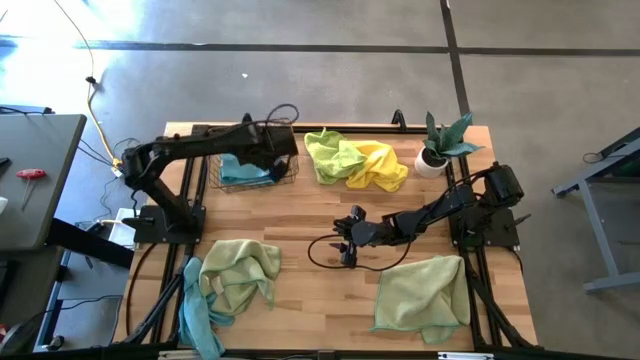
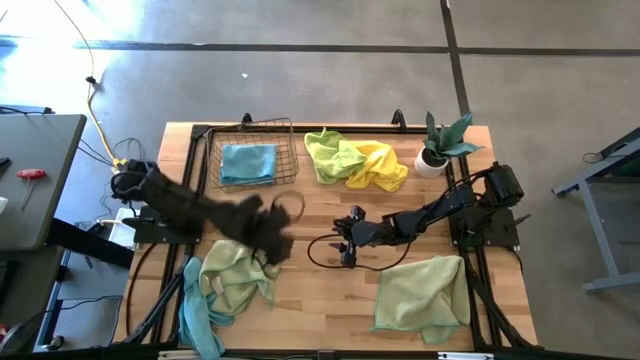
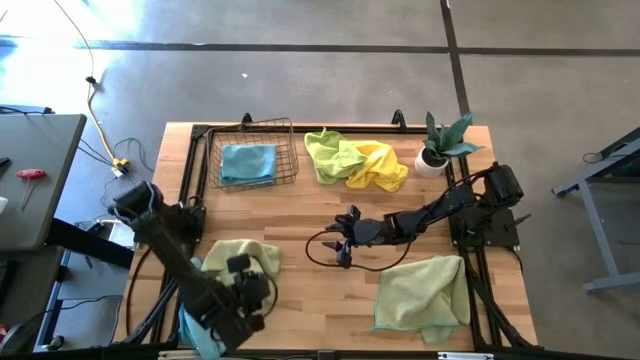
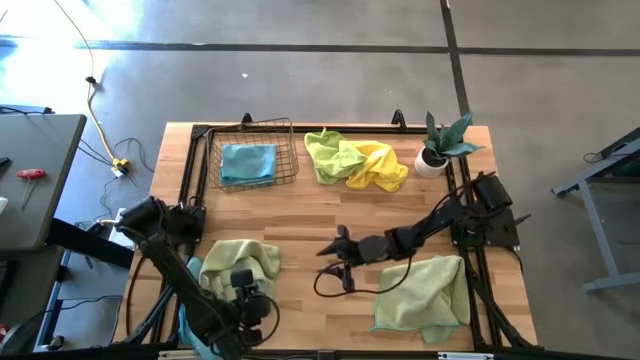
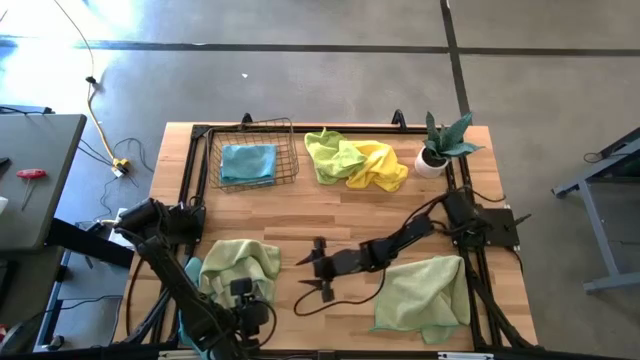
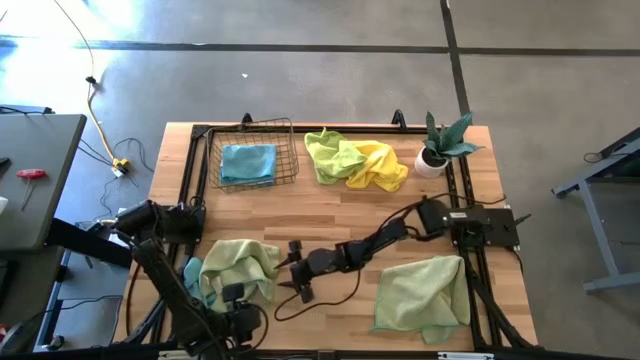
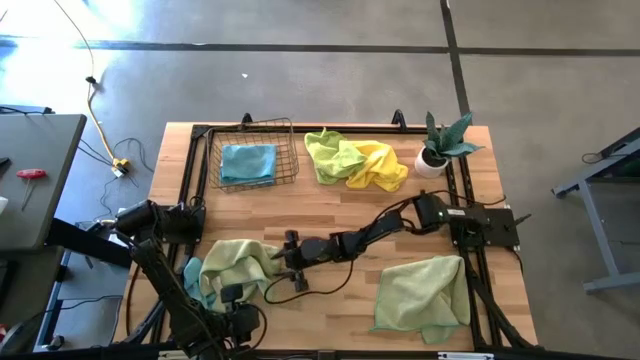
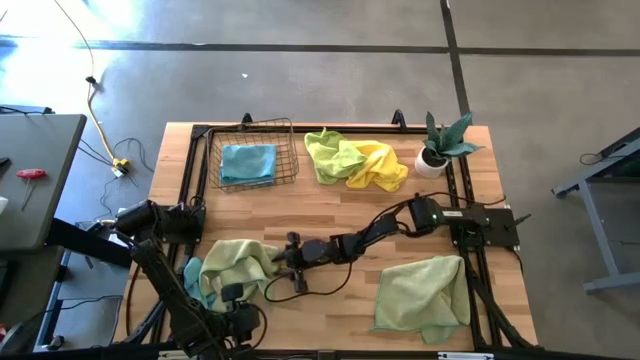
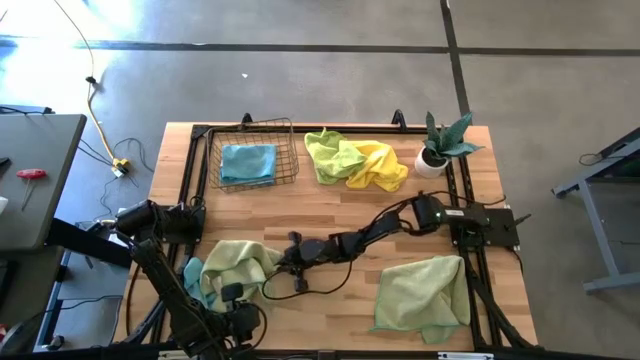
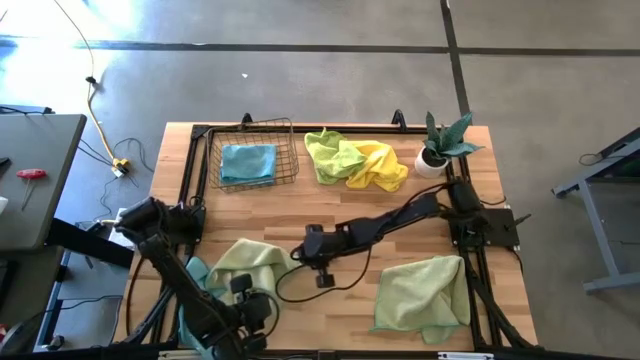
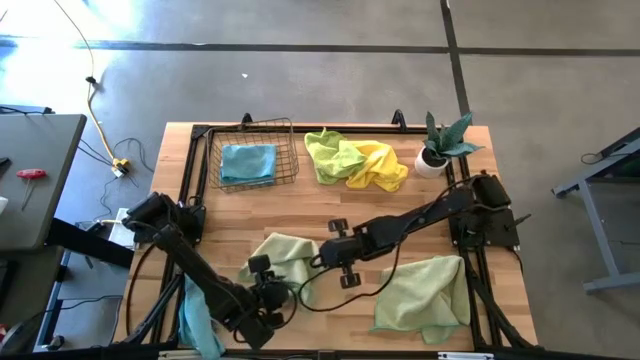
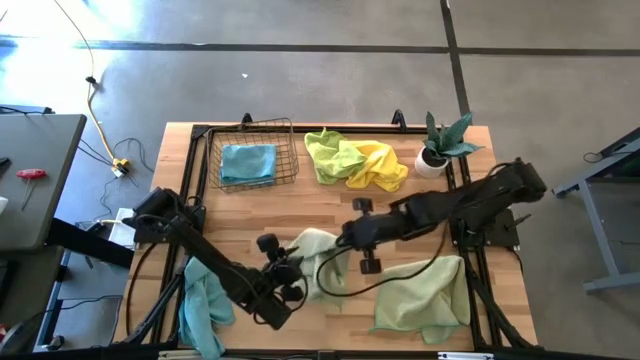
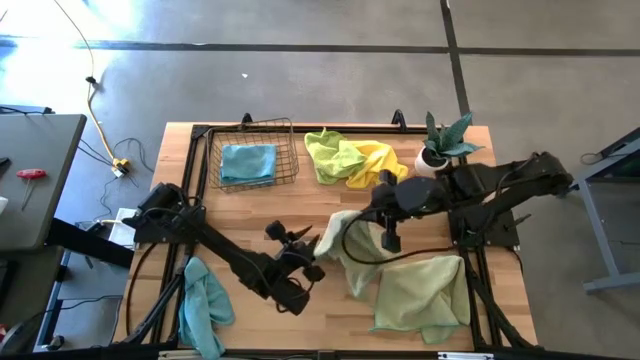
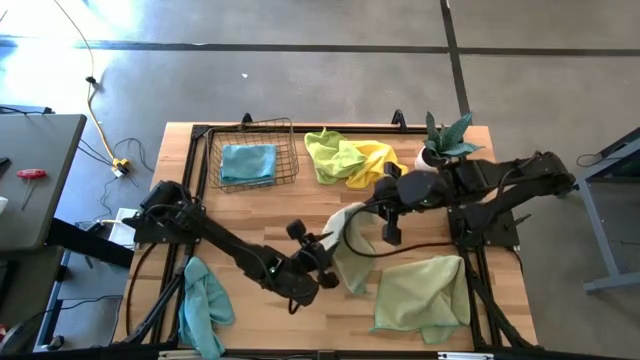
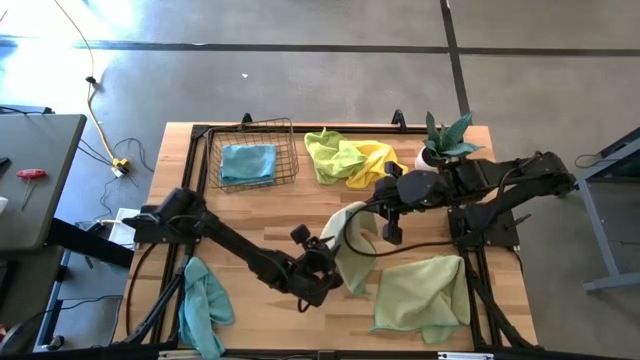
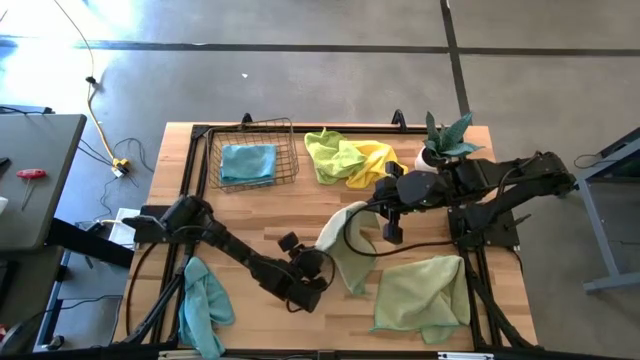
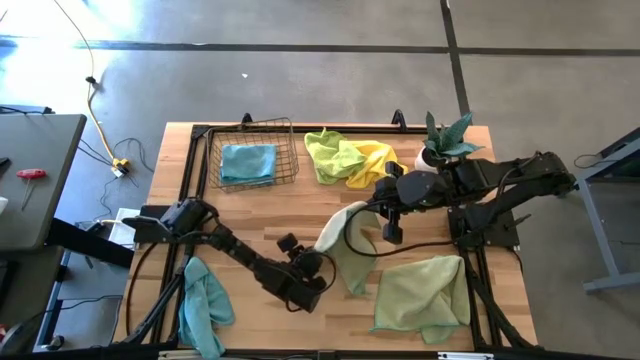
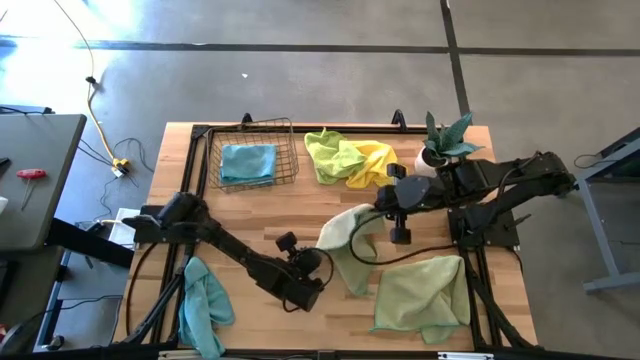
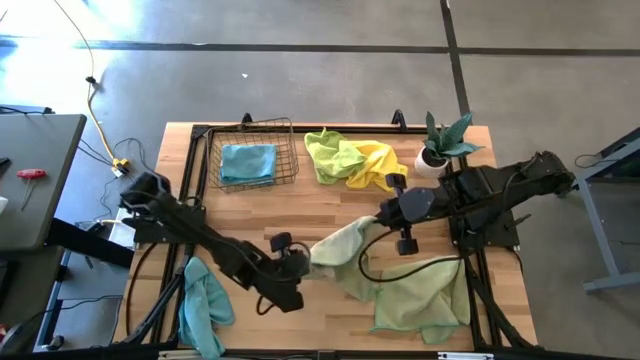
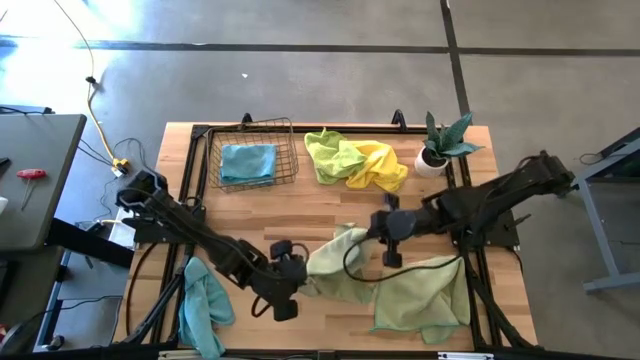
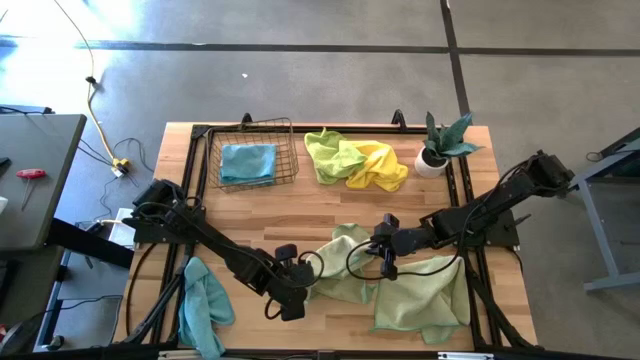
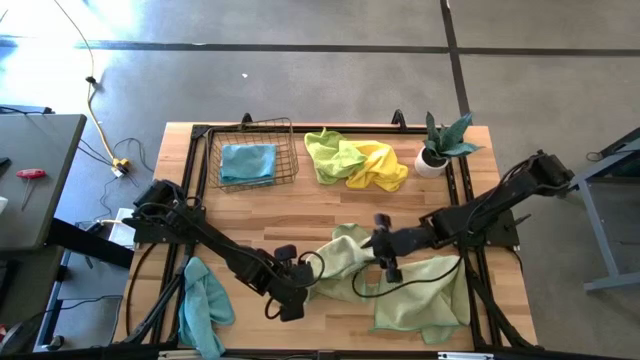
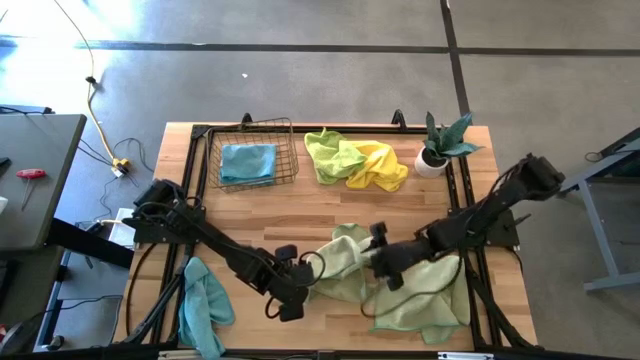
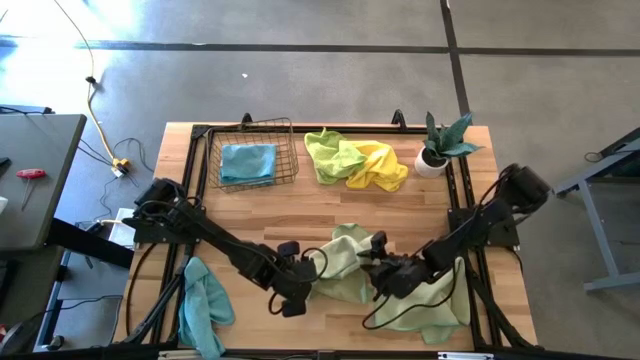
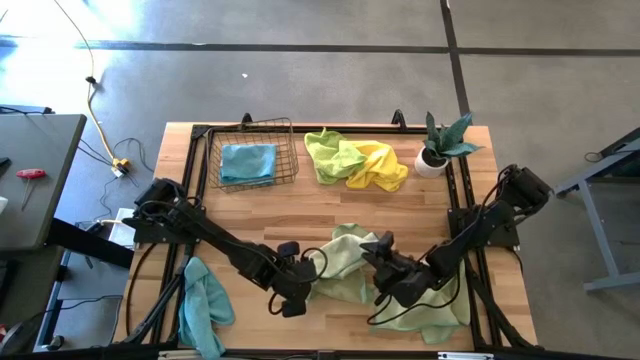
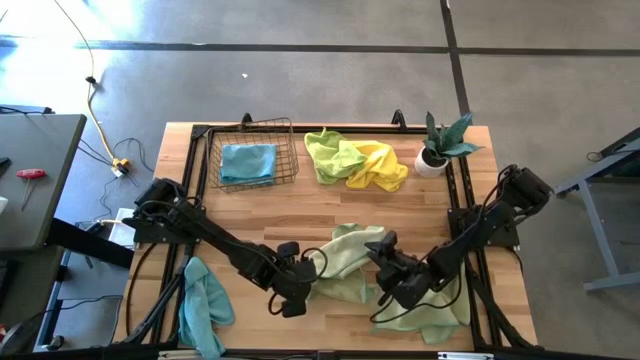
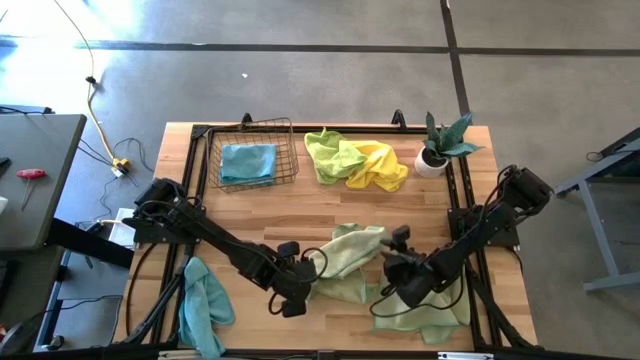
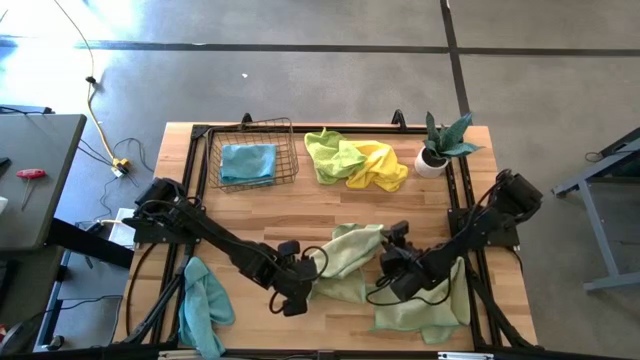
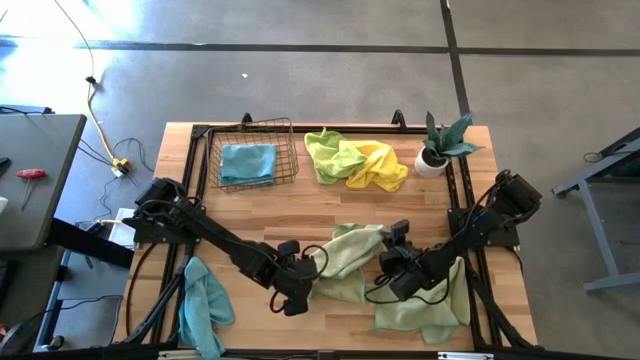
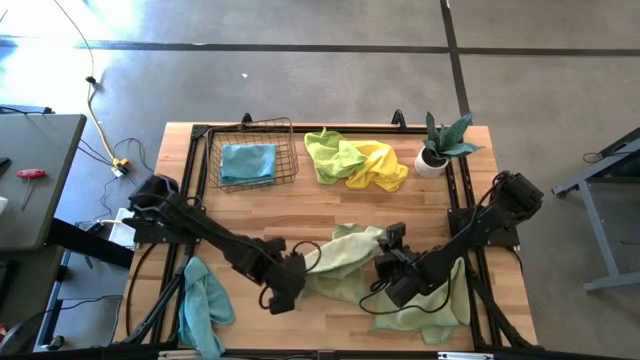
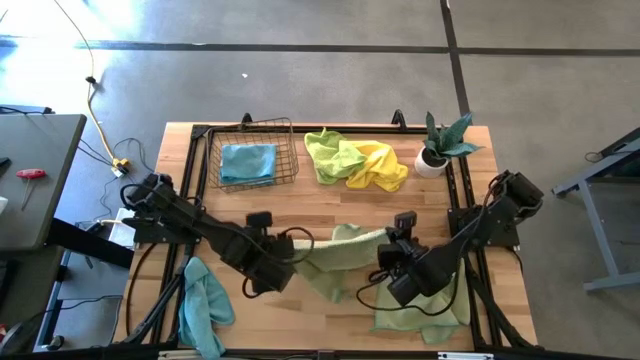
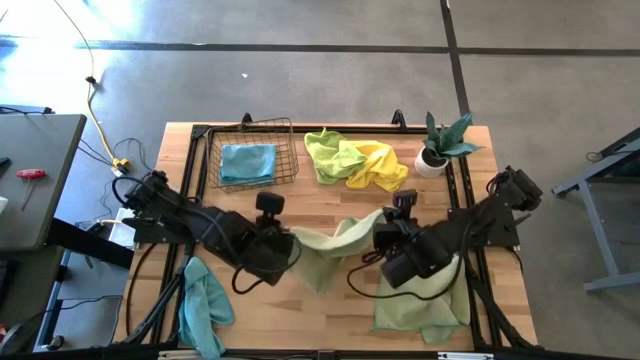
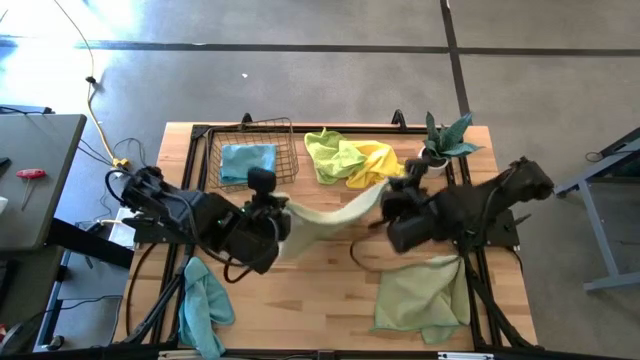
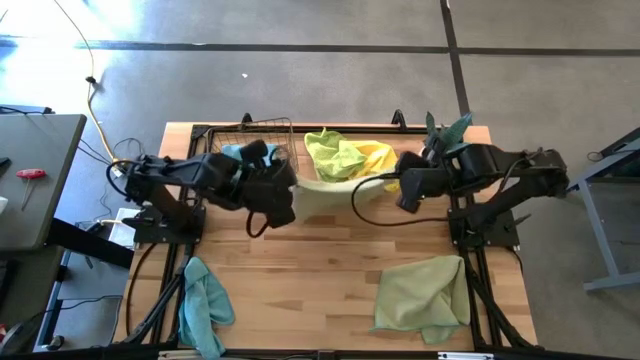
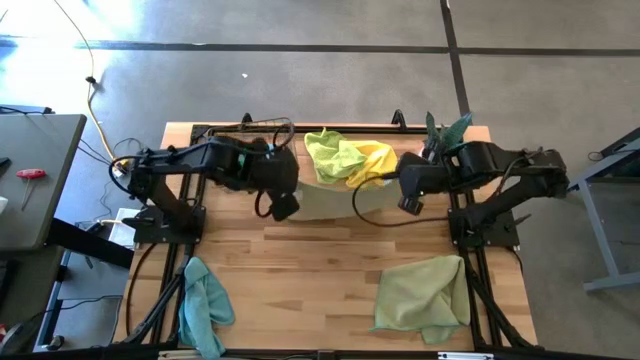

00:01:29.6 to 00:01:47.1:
Task: Fold microfiber towels
Fold the left green towel

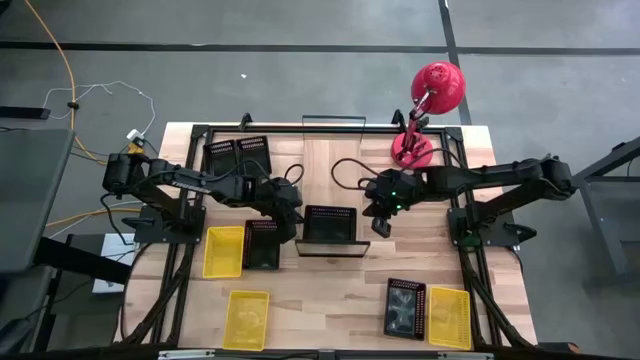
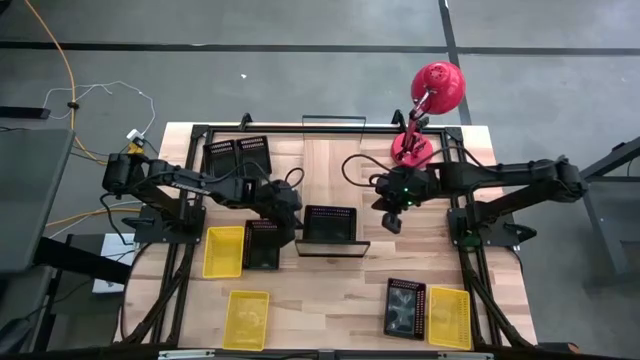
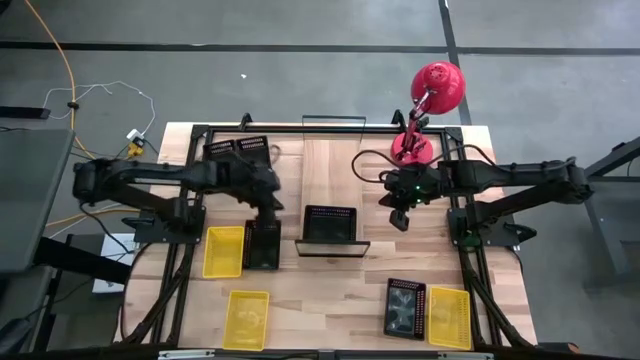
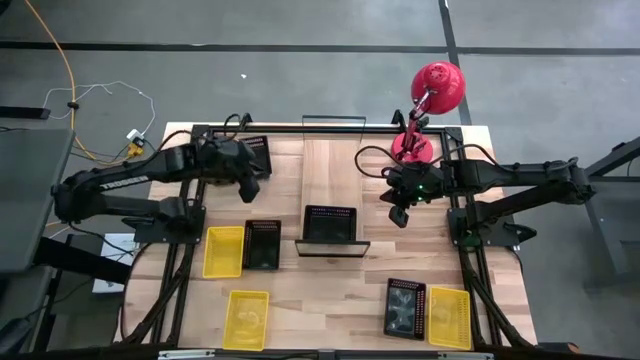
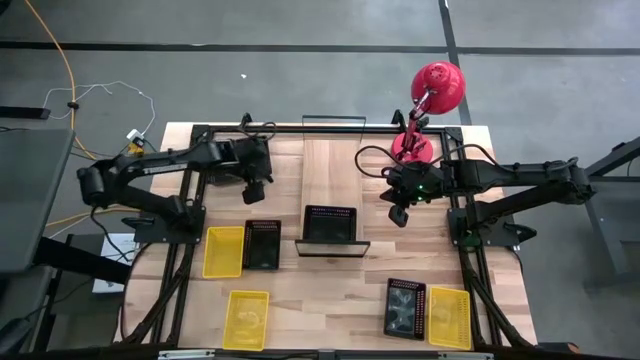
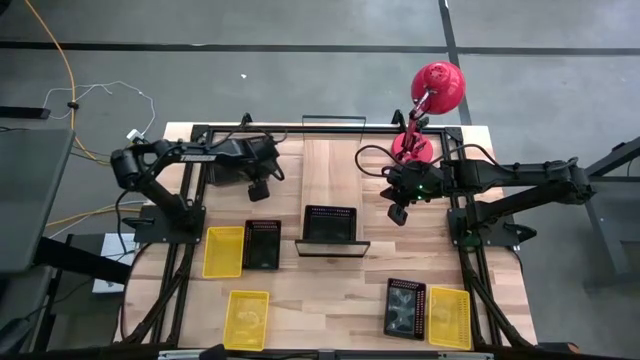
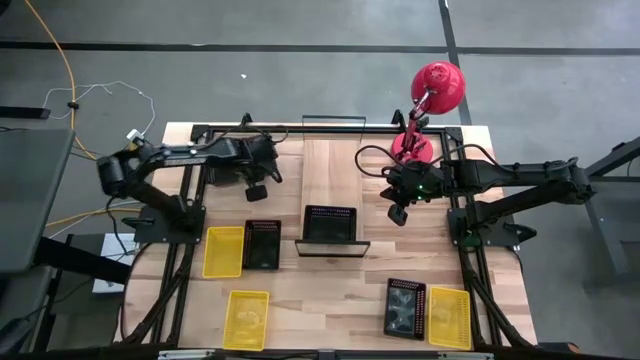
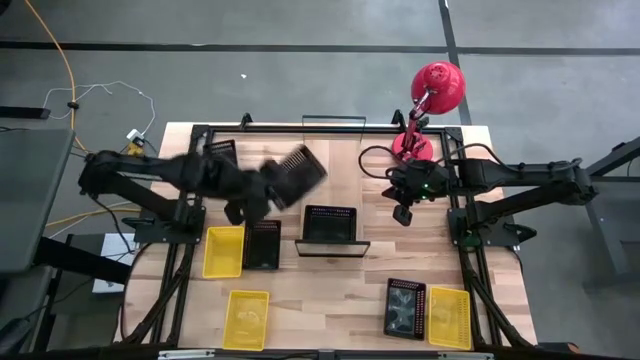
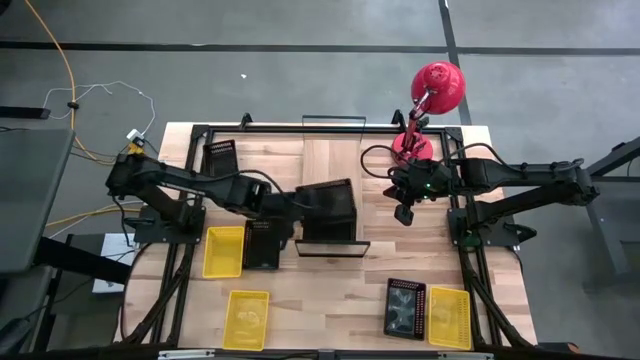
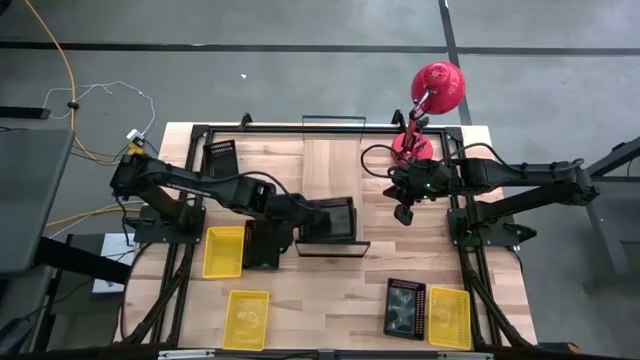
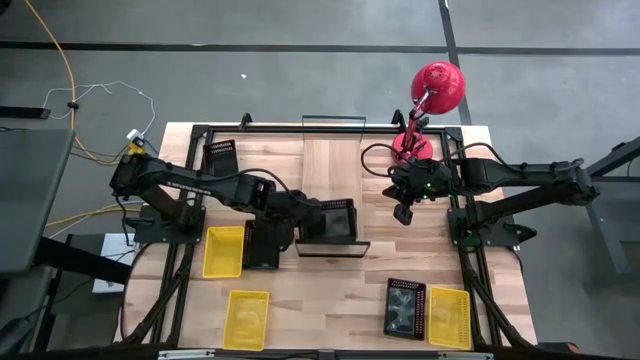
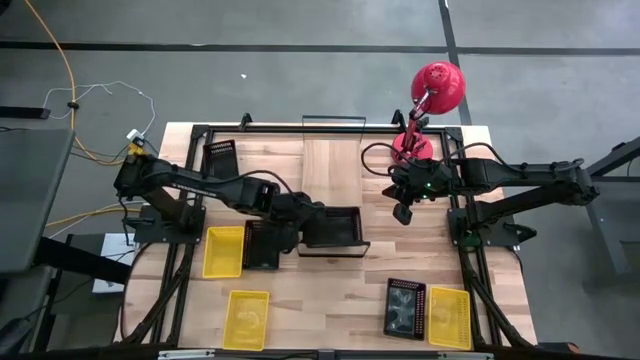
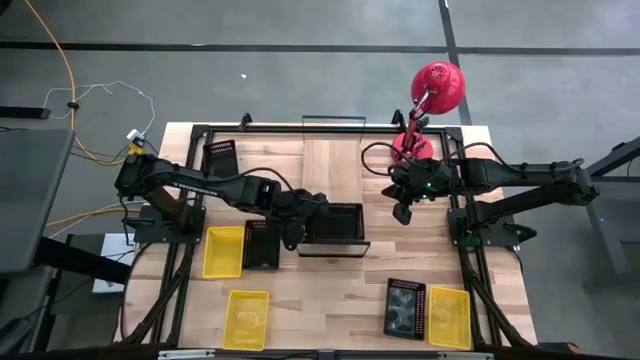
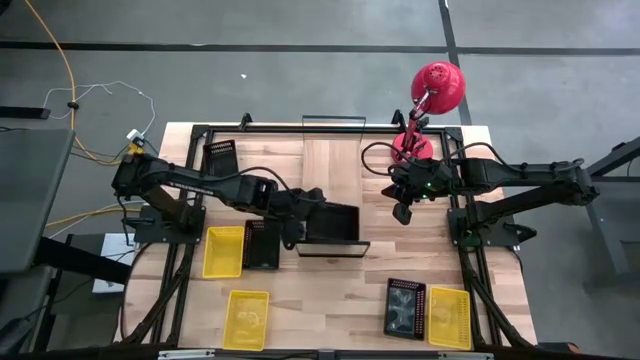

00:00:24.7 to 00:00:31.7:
Task: Stack baskets on shelf by color
Stack the black bin on top of the black bin on the shelf
